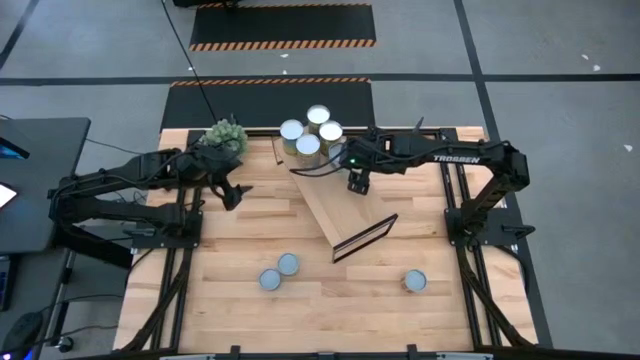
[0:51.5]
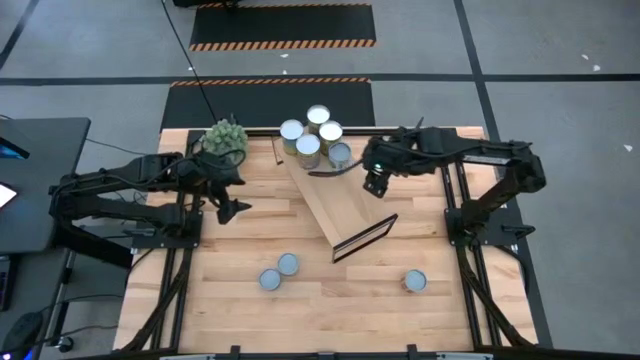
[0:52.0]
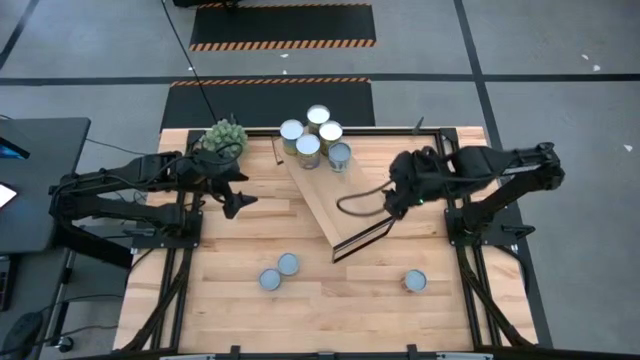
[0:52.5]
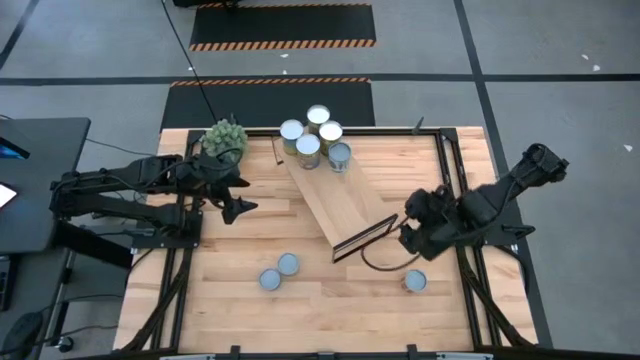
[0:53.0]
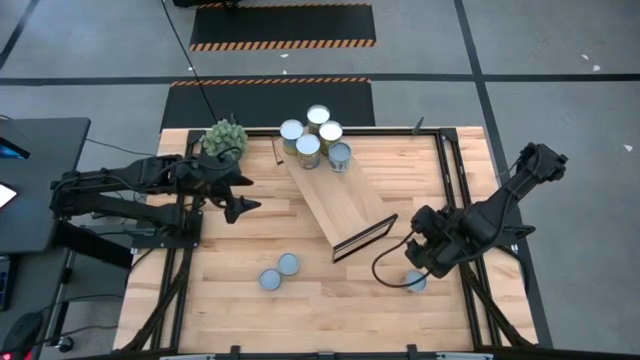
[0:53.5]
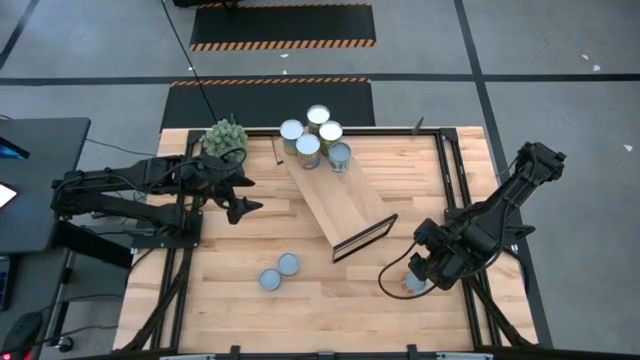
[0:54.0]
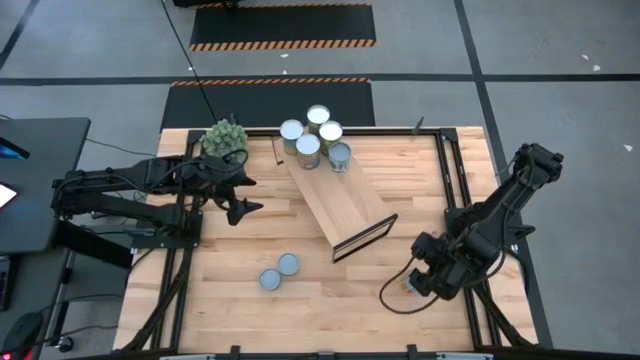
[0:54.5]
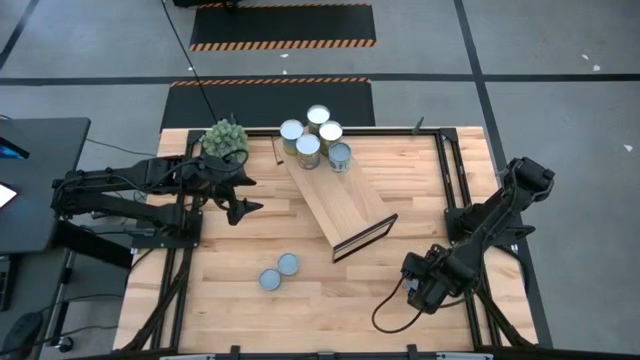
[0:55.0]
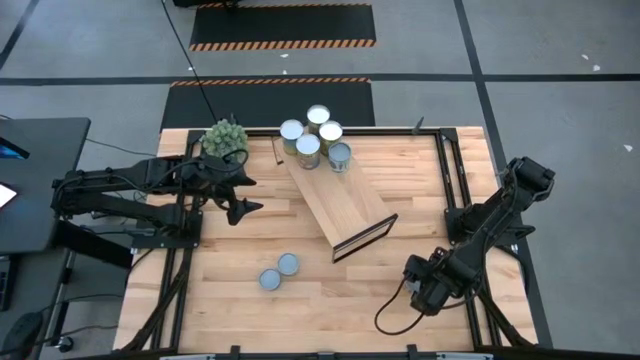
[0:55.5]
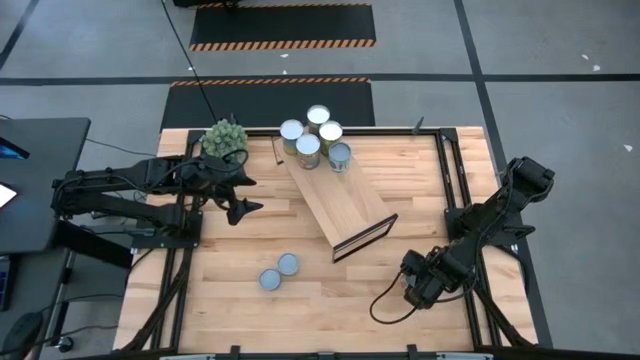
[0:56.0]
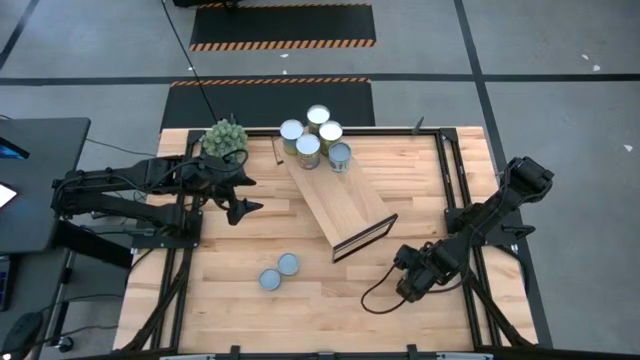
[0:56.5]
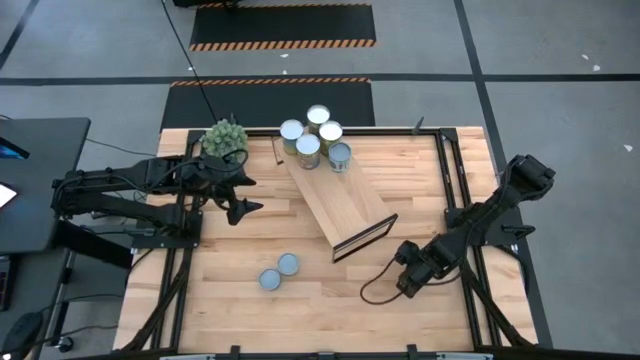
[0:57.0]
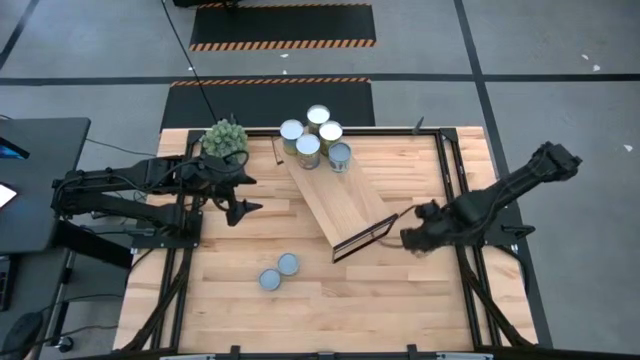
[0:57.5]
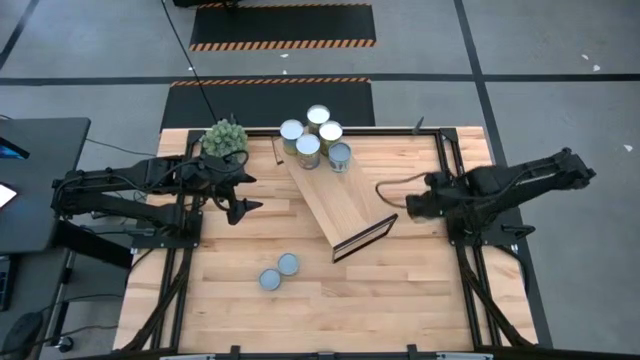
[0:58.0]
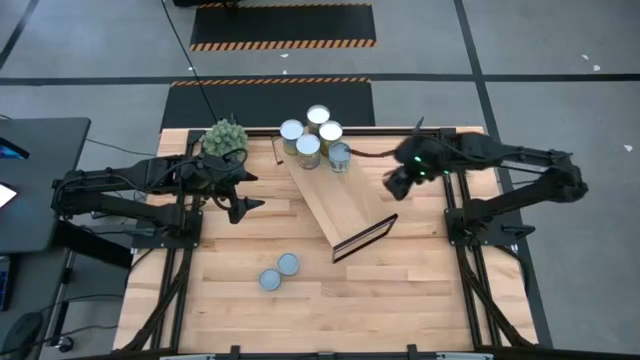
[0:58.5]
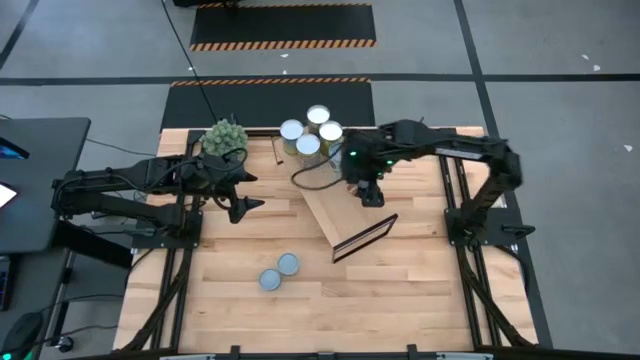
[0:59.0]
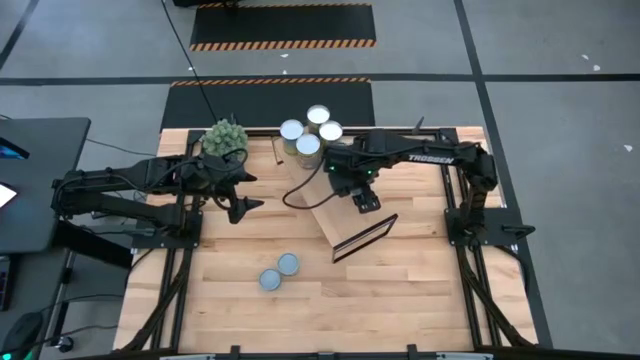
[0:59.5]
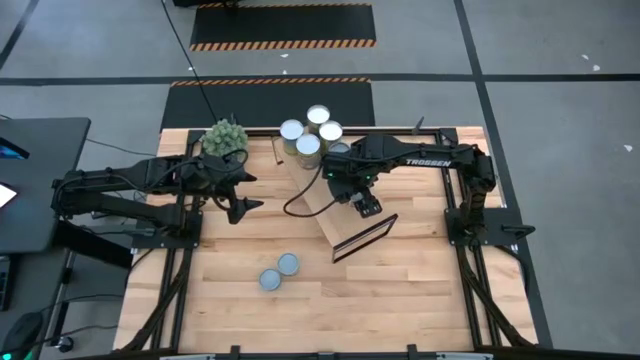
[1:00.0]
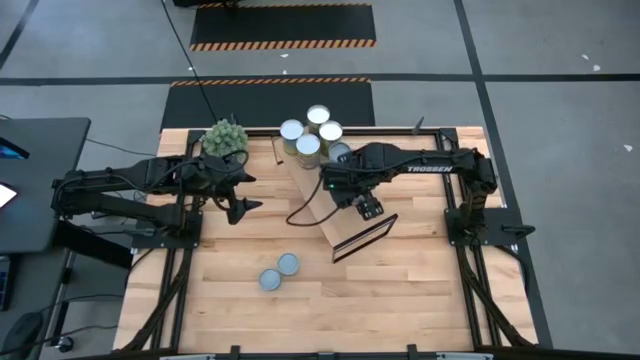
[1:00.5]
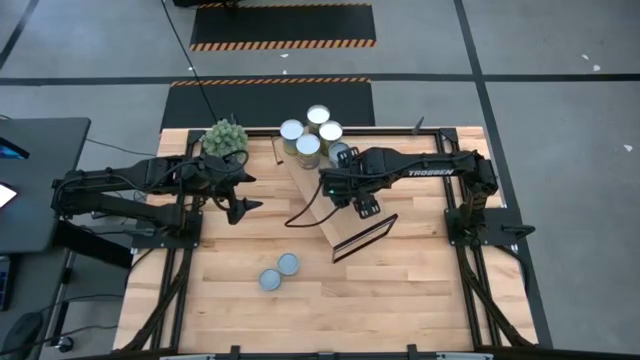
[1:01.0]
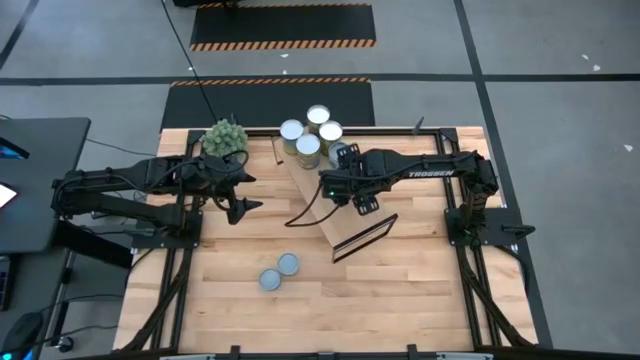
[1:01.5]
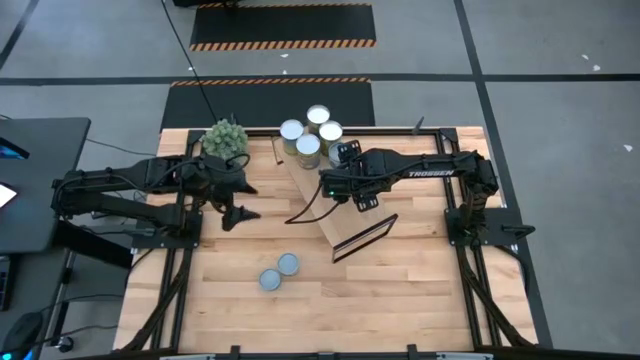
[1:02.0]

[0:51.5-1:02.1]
Task: Pick and place cans onto a shelf
Put the canned diced tomatoes on the shelf

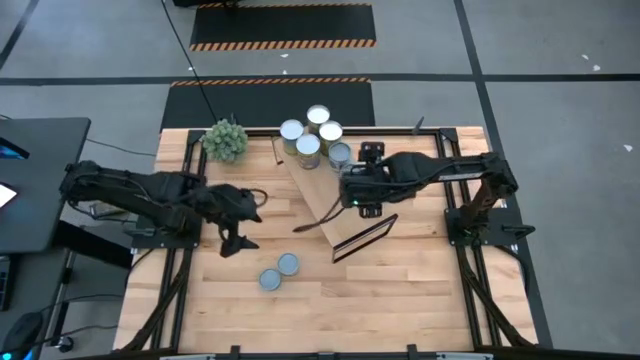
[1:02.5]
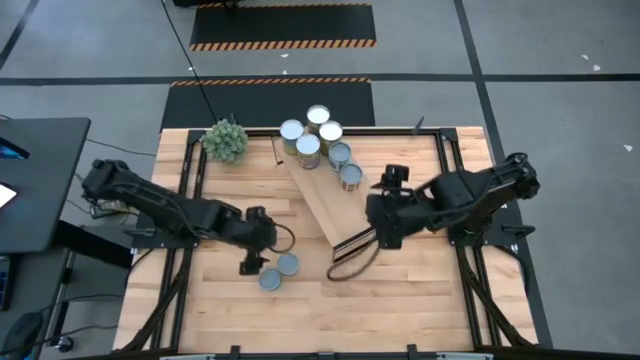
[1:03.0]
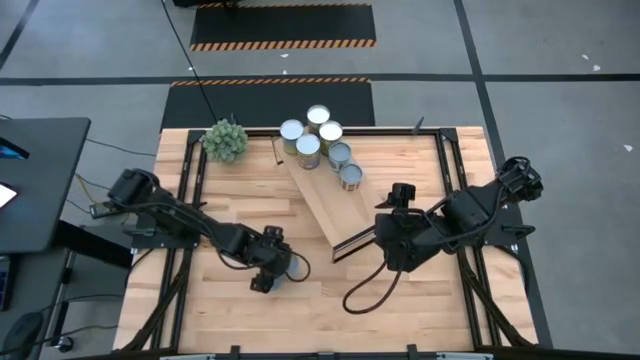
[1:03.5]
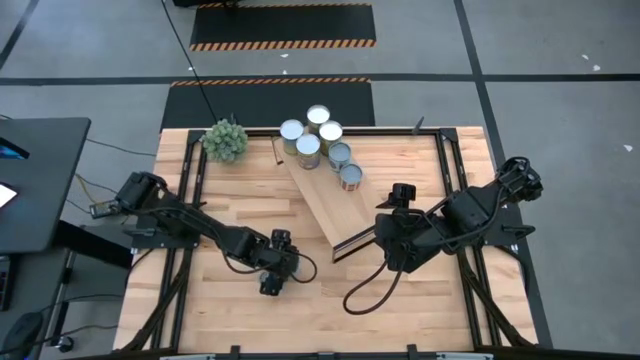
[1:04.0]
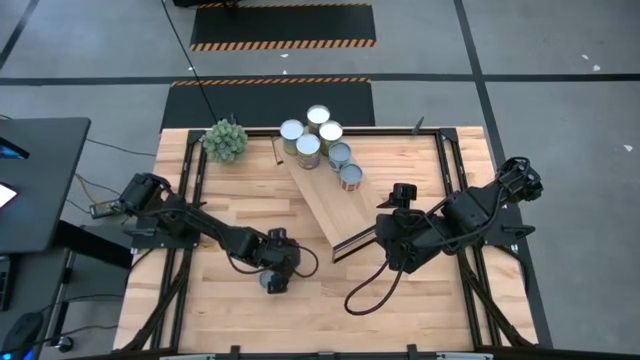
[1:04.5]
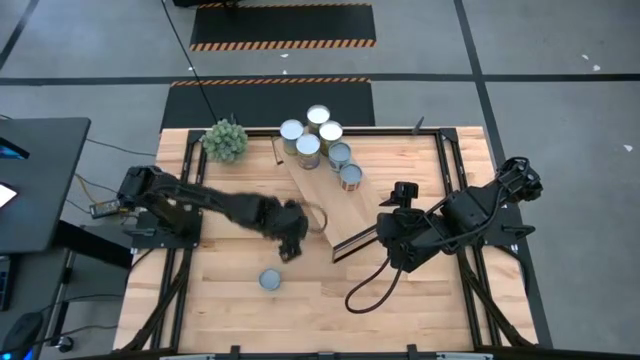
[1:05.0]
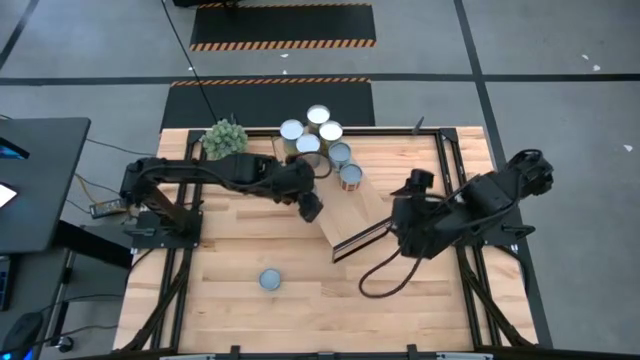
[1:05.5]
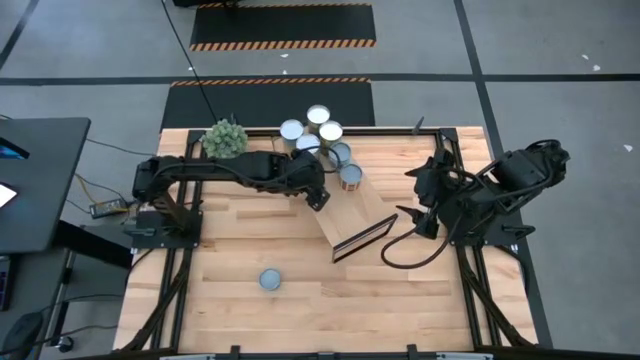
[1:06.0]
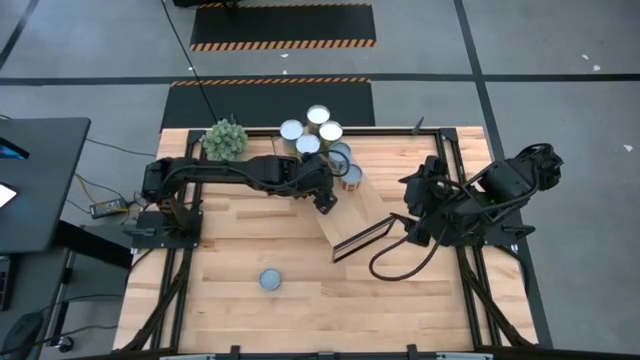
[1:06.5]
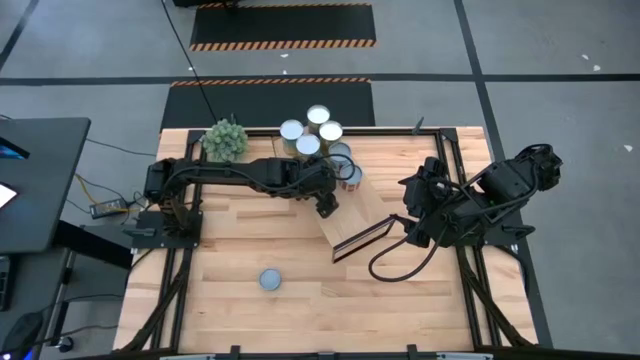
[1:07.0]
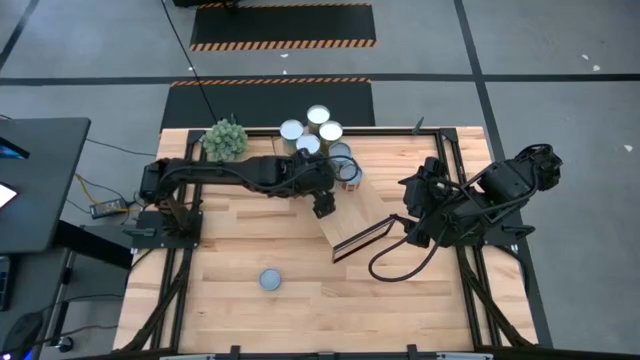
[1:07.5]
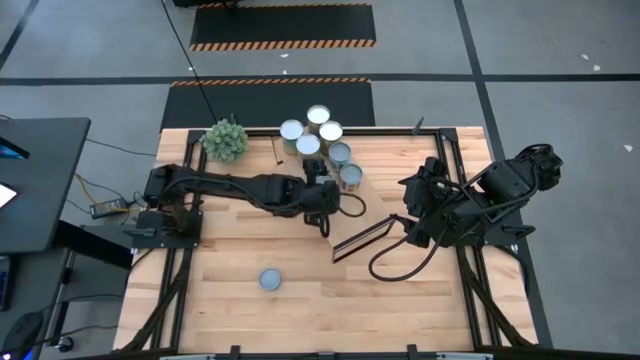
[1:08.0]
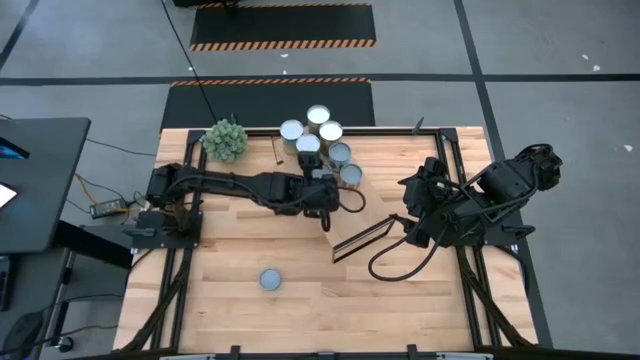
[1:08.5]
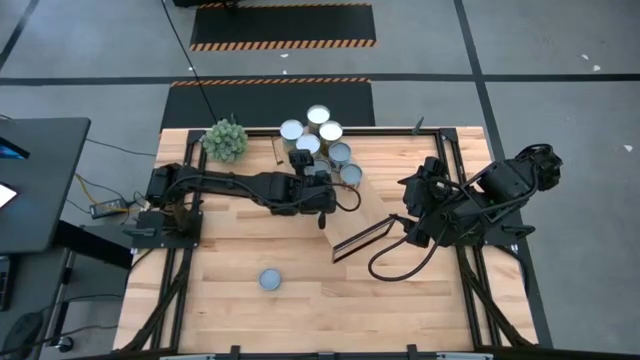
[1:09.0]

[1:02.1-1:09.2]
Put the small canned peas on the shelf

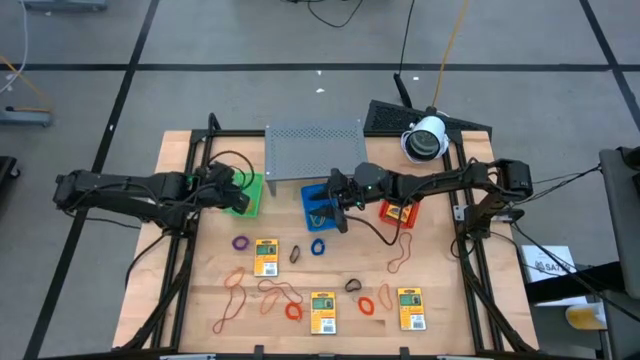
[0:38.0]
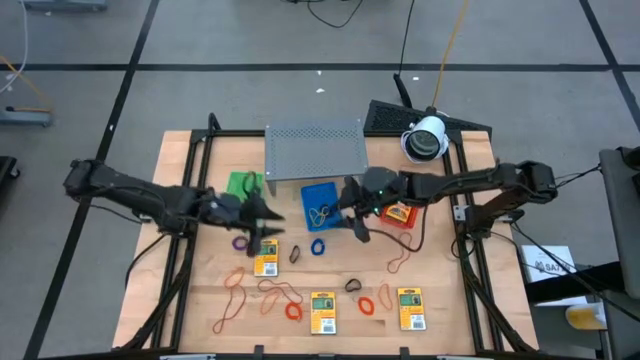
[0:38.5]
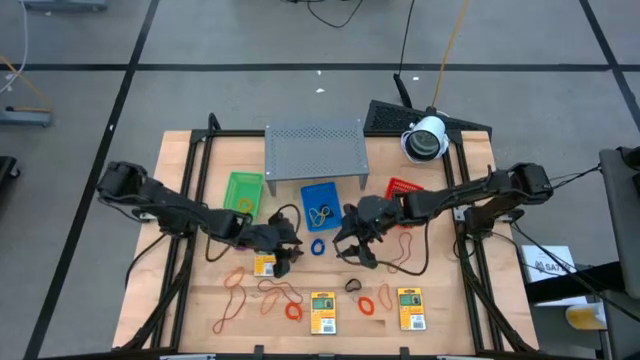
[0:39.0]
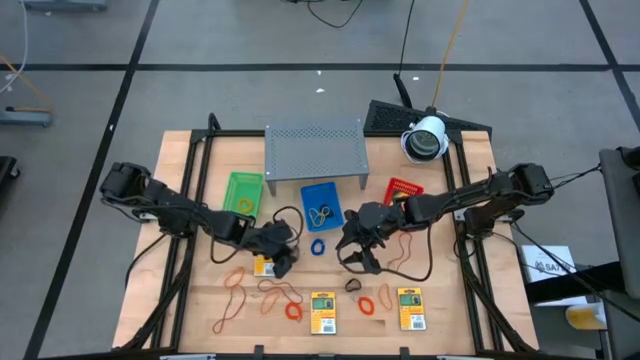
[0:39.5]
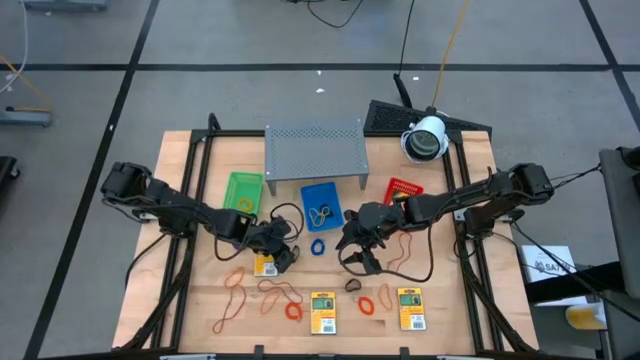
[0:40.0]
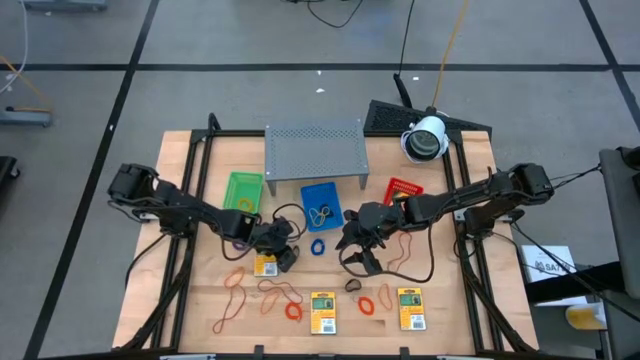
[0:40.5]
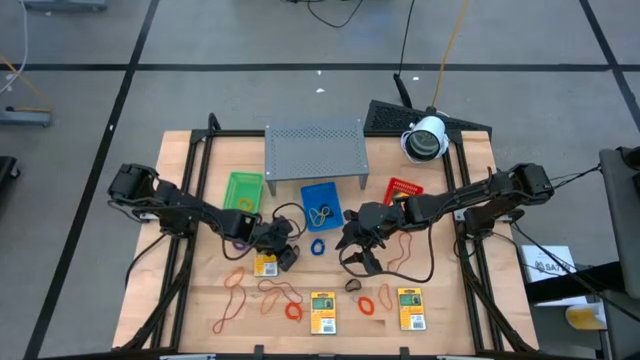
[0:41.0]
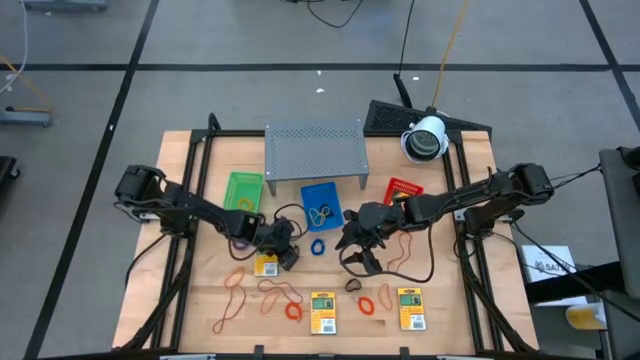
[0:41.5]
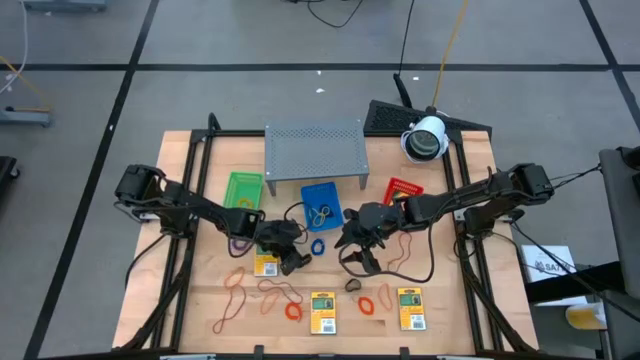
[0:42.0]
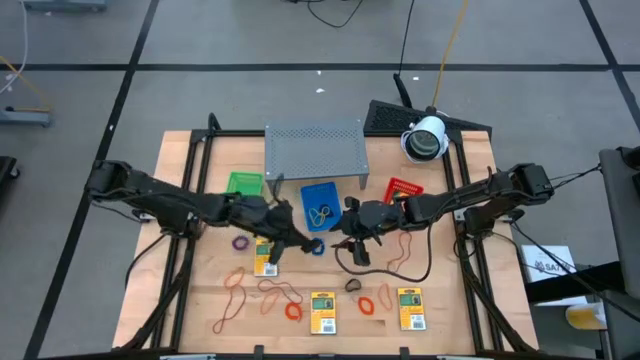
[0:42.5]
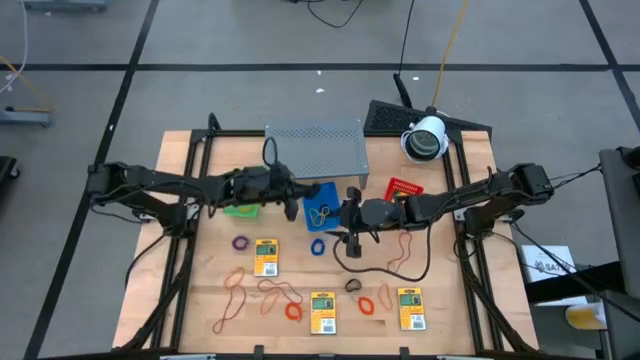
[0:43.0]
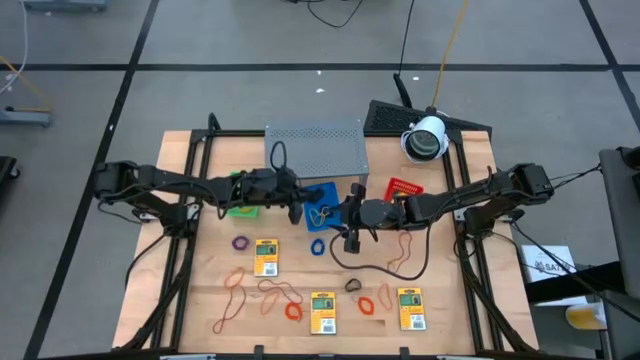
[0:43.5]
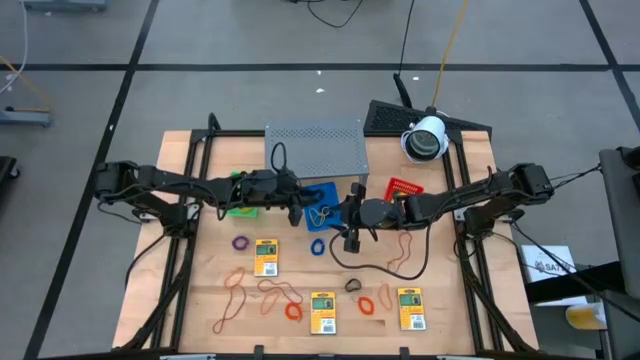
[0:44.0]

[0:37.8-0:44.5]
Task: Pick & Place Office Desk Supplies
Put the black rubber band into the blue bin
